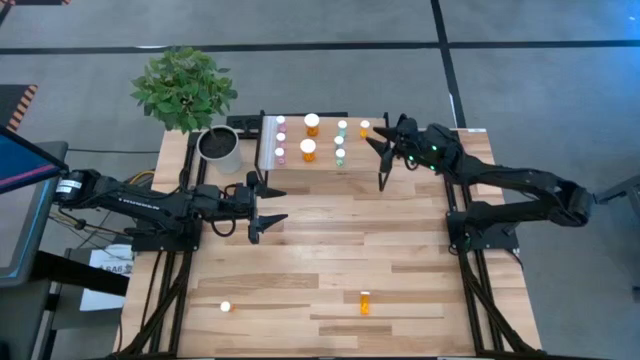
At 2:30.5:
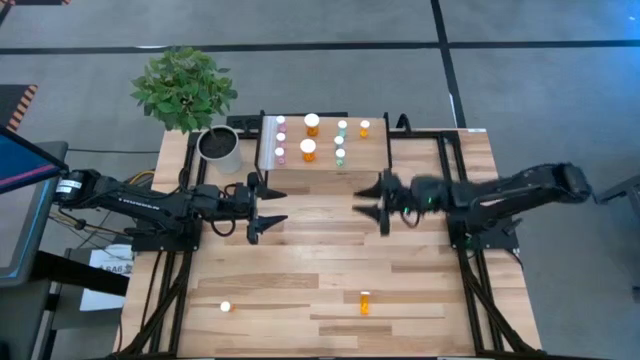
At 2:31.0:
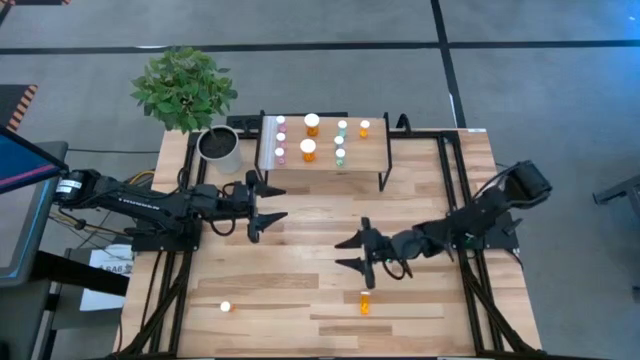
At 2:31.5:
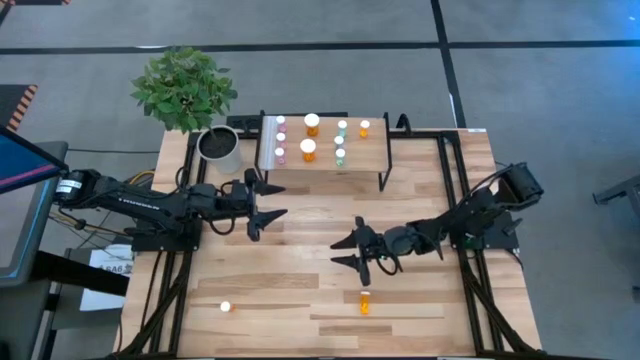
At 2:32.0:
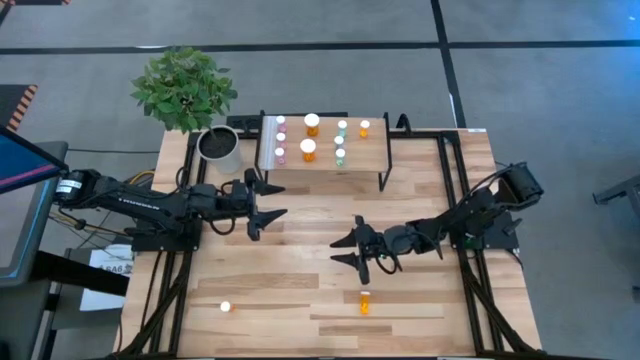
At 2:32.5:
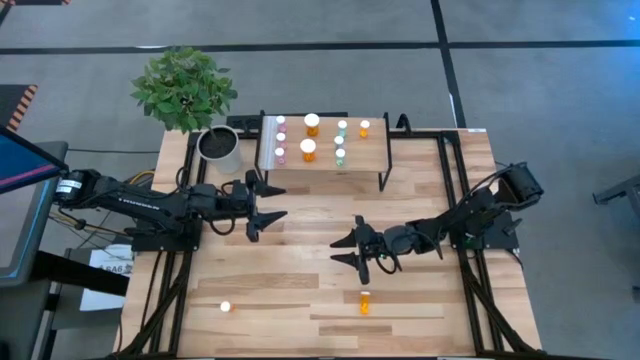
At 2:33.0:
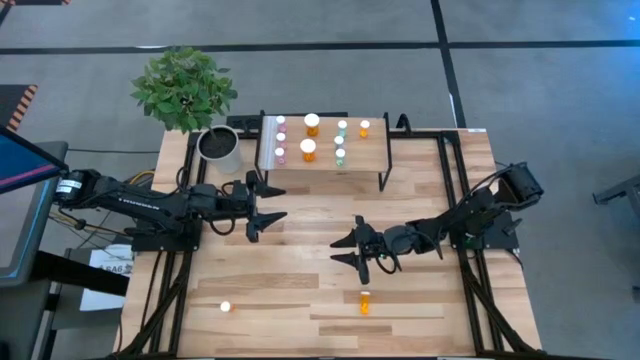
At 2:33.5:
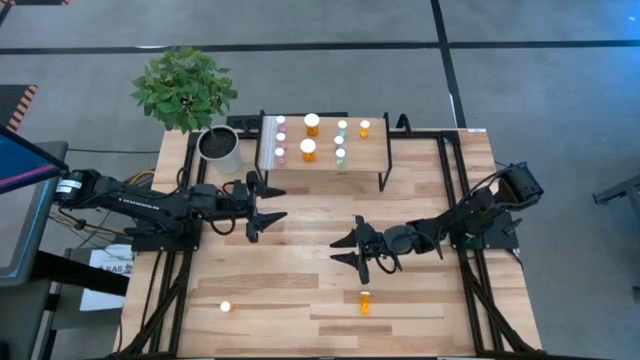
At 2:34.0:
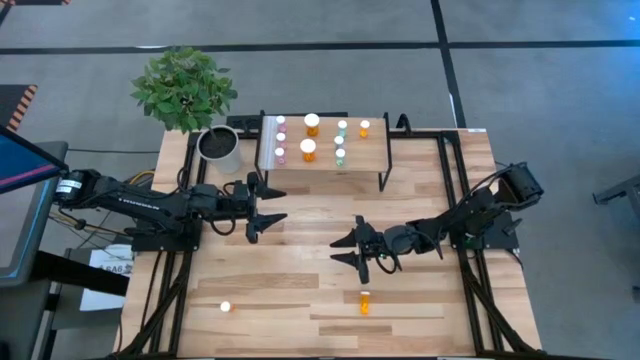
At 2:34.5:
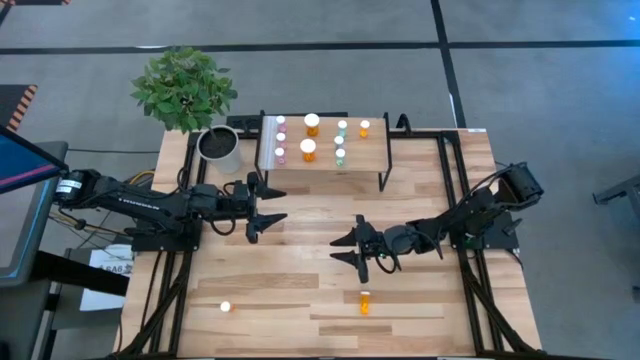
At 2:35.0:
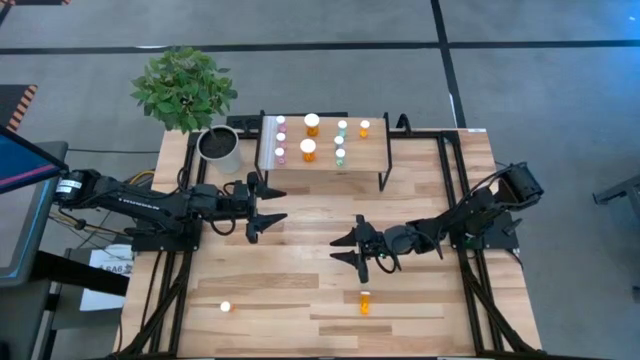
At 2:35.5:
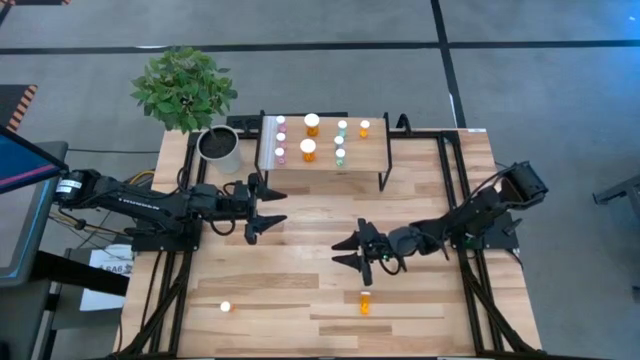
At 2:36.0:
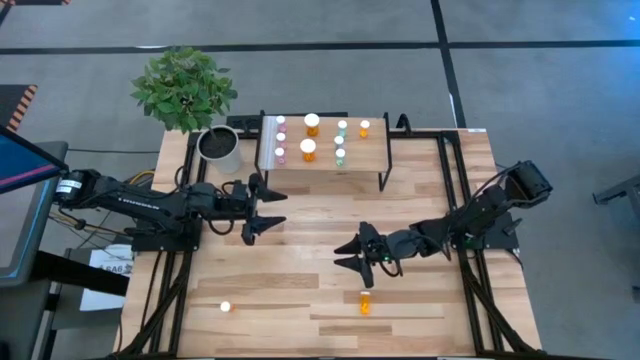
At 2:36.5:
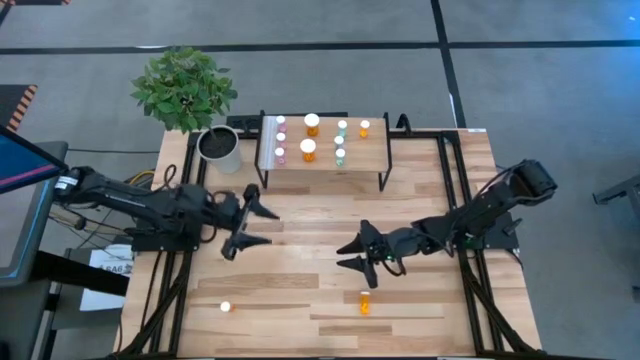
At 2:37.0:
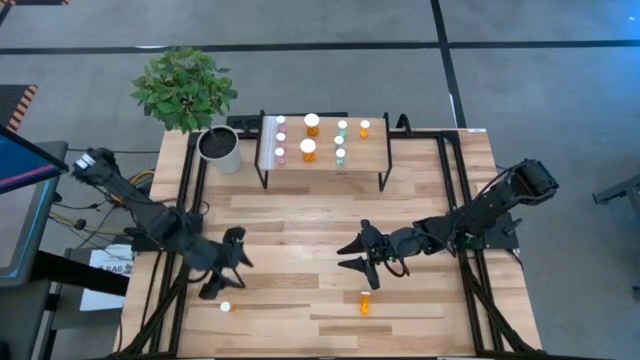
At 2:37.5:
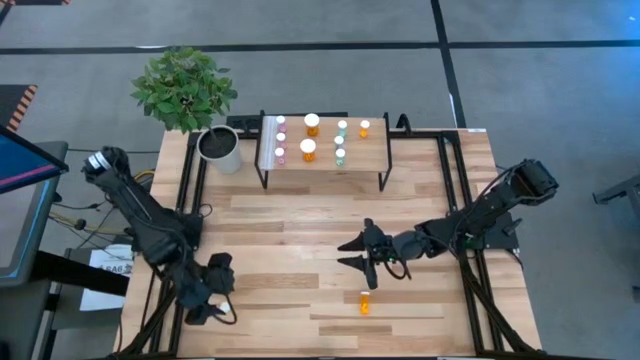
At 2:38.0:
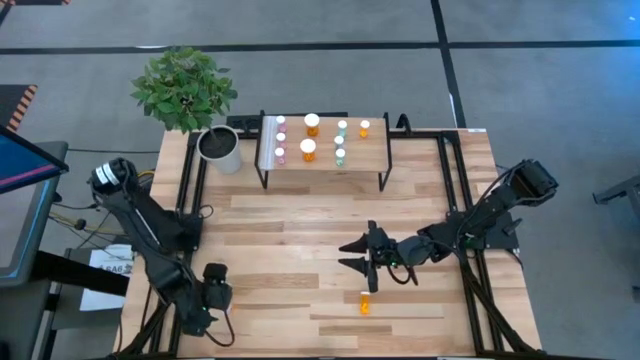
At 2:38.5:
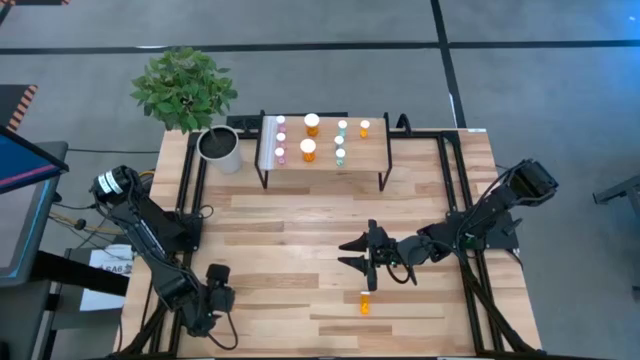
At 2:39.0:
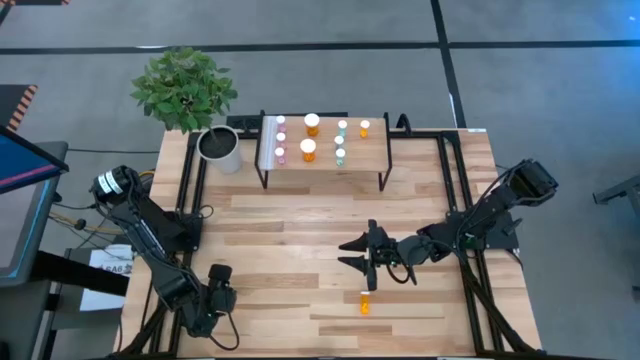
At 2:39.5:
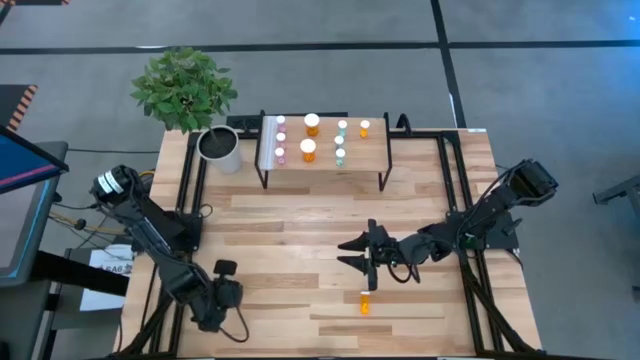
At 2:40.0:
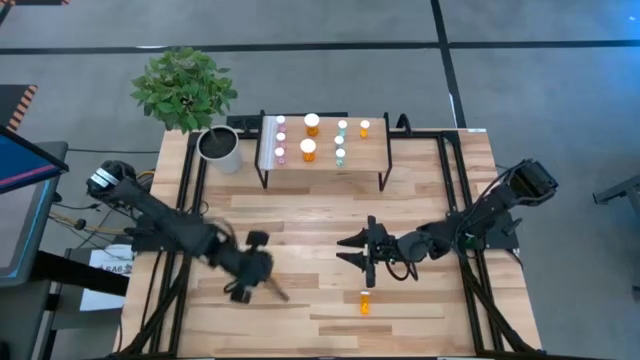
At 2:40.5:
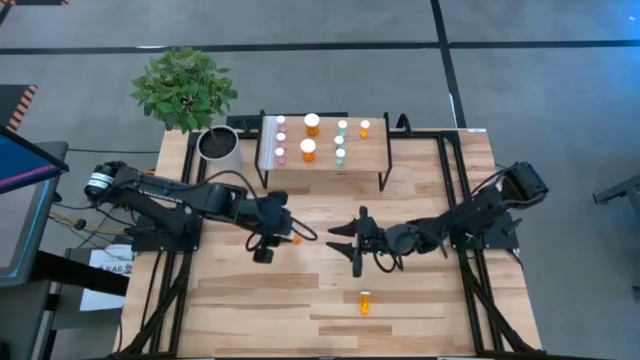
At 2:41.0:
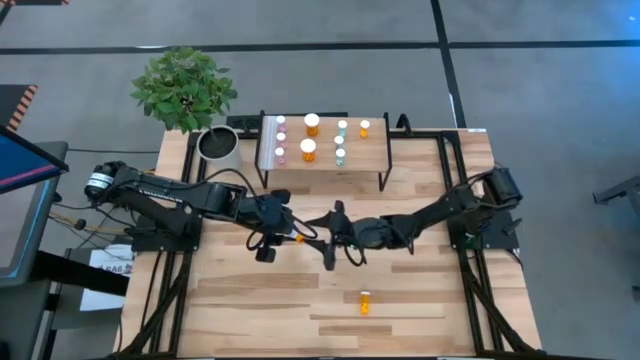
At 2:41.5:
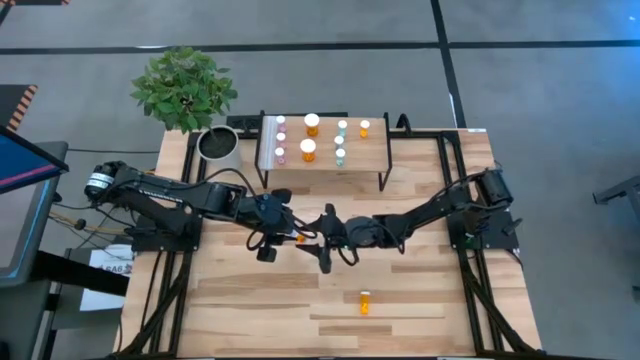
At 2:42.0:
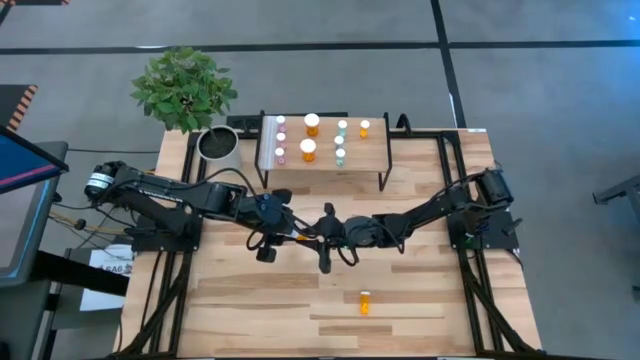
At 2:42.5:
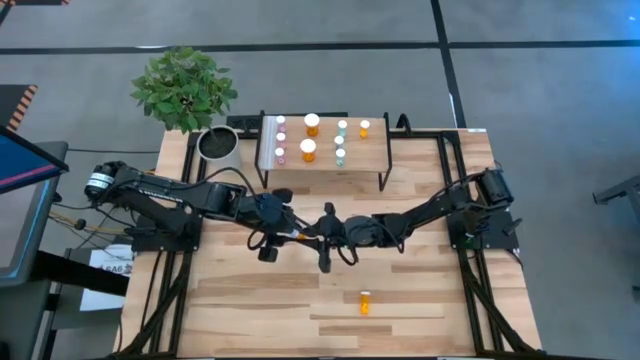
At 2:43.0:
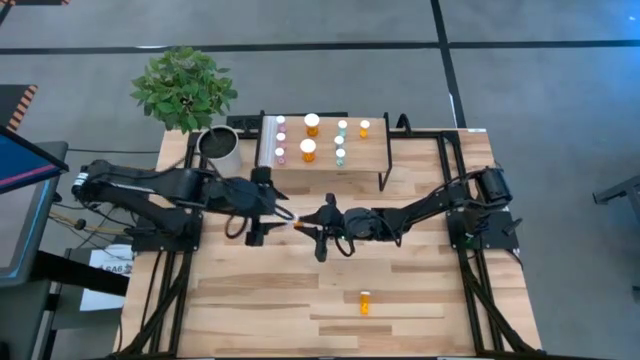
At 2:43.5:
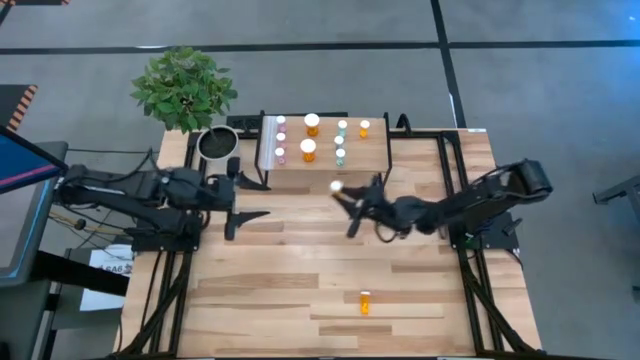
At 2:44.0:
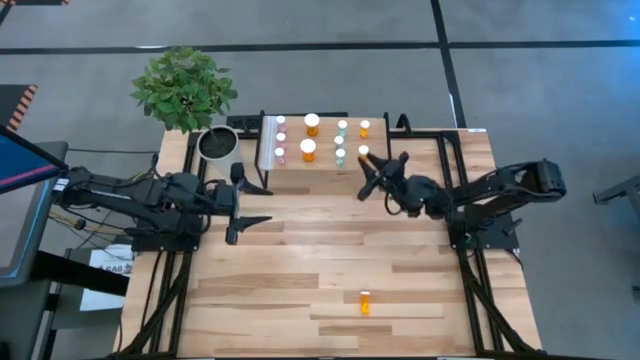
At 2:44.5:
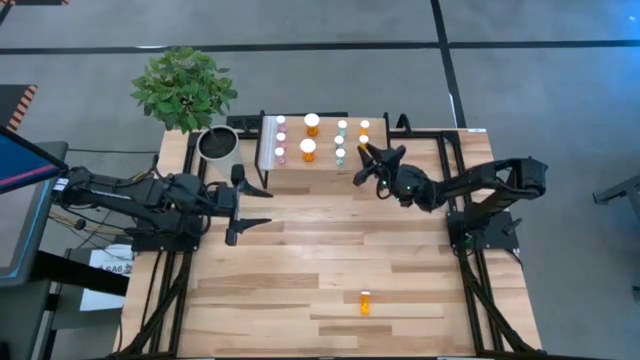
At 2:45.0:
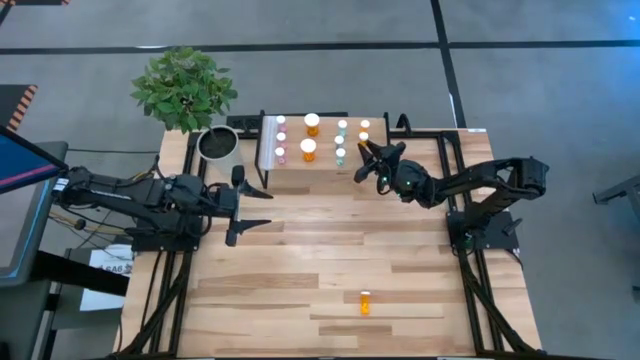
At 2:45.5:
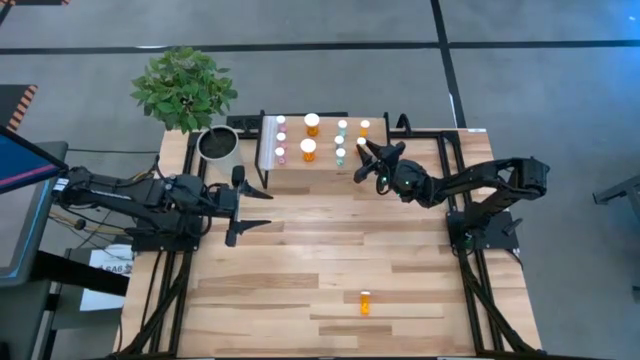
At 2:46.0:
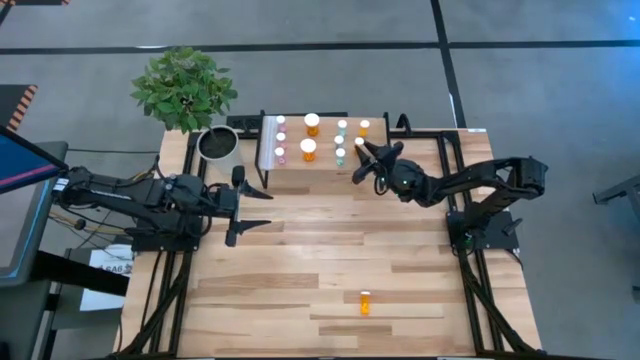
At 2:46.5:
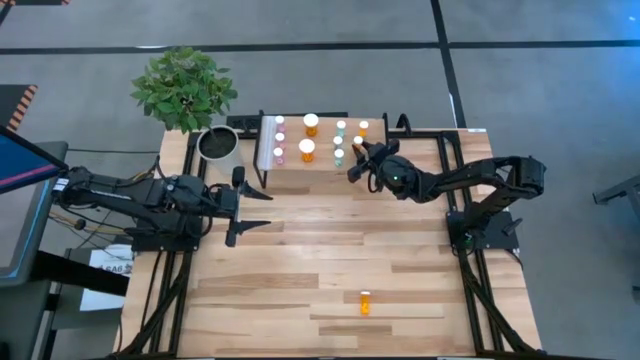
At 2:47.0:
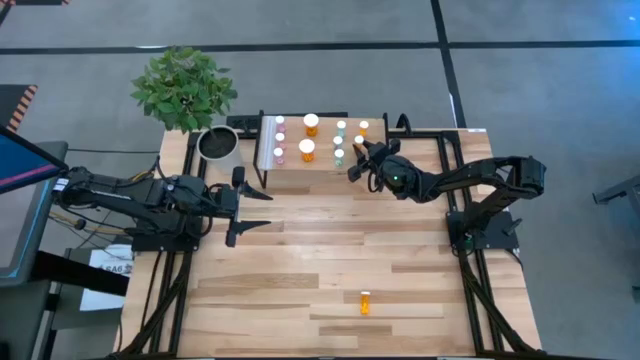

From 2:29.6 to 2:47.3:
Task: Pick and place medicine bottles onto shelf by color
Put the left small orange pill bottle on the shelf aligned with the other small orange pill bottle

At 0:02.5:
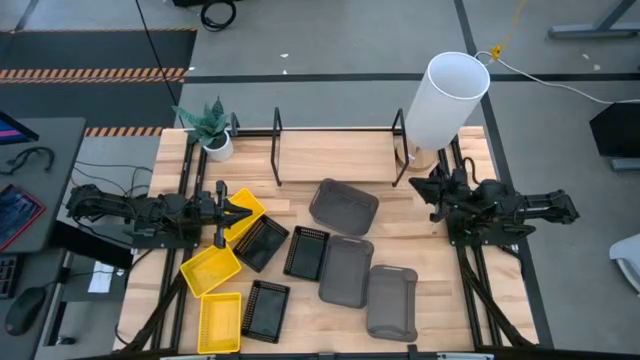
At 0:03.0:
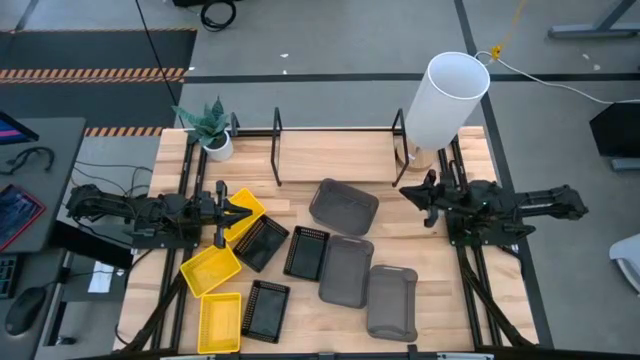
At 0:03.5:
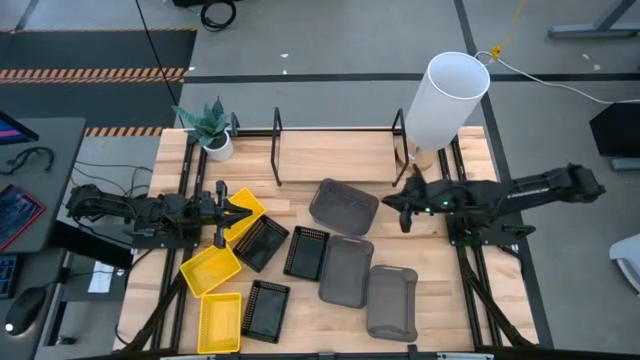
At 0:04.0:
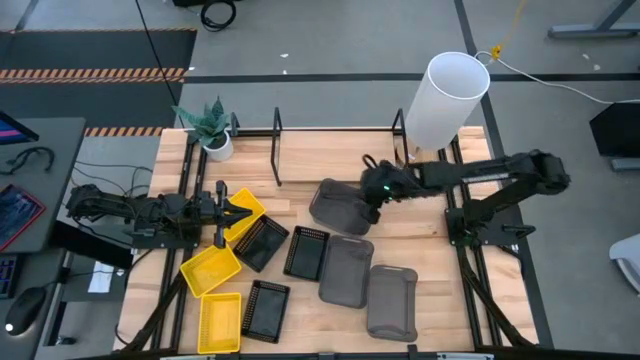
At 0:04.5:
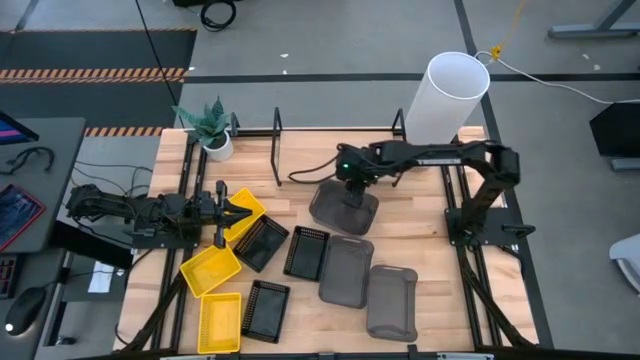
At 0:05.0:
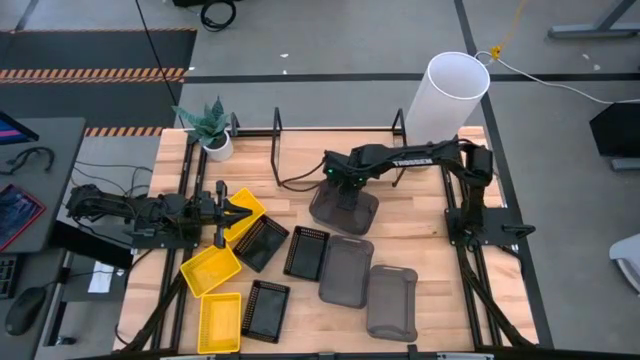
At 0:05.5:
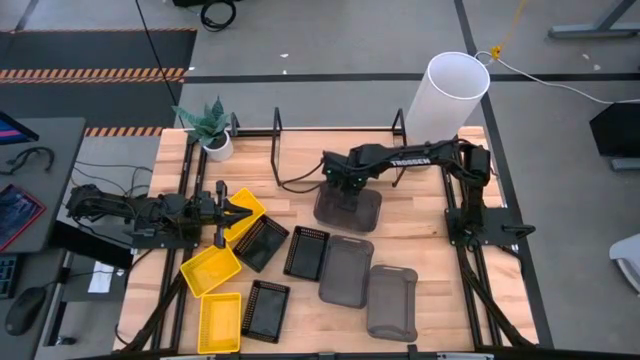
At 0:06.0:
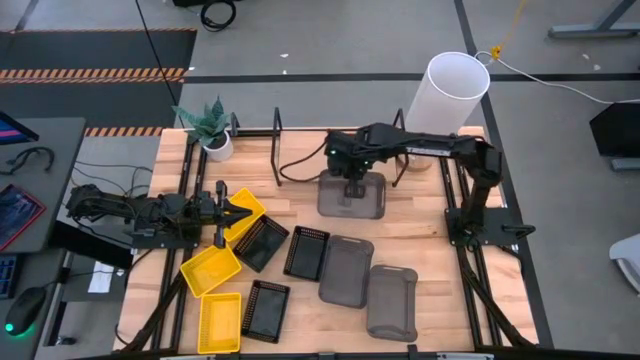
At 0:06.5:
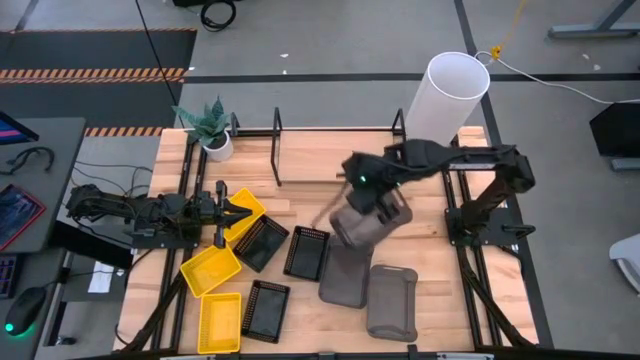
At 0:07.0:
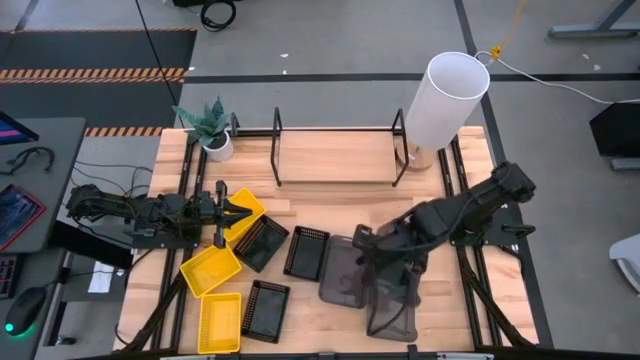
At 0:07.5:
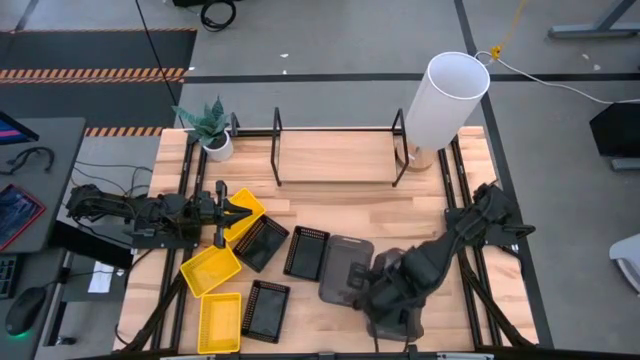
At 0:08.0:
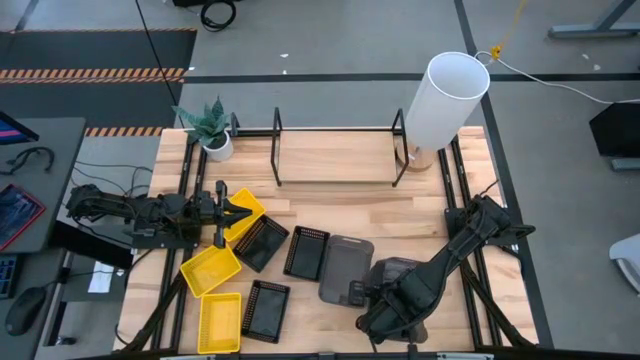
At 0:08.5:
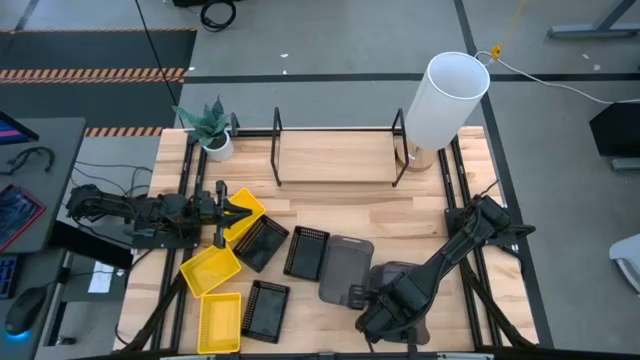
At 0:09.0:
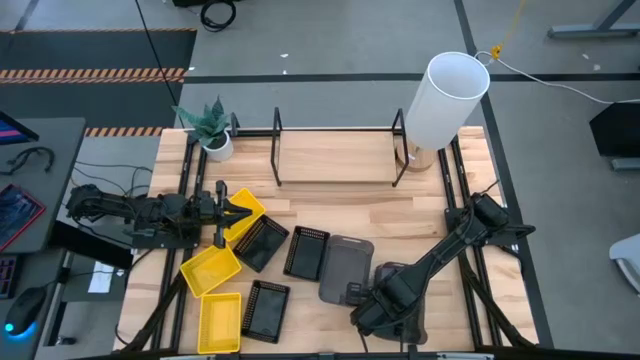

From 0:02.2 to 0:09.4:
Task: Stack baskets on shelf by color
Stack the top black bin on top of the bottom right gray bin
